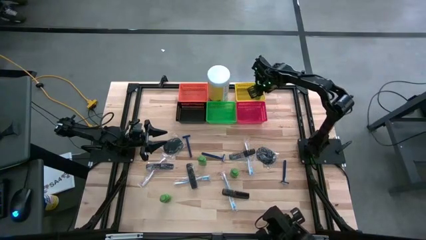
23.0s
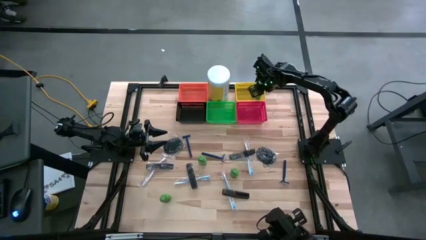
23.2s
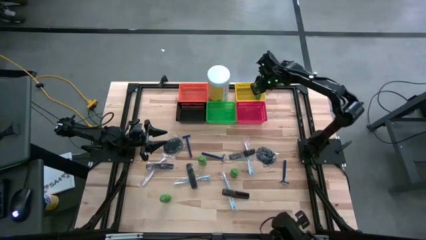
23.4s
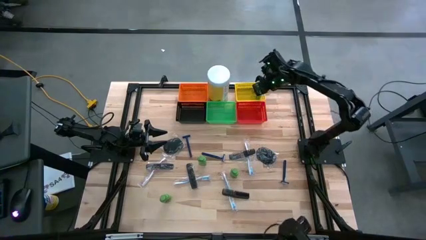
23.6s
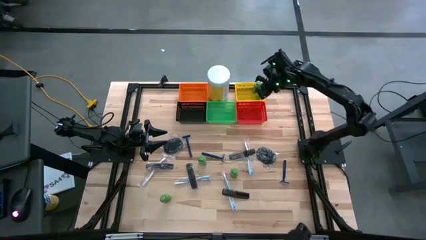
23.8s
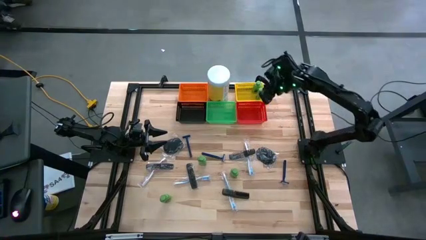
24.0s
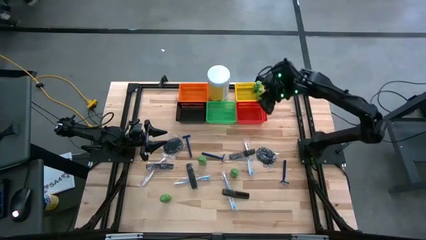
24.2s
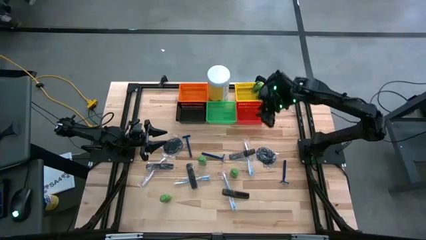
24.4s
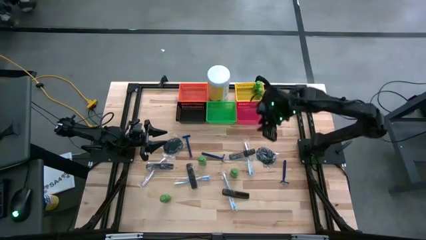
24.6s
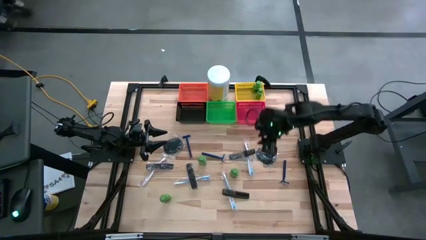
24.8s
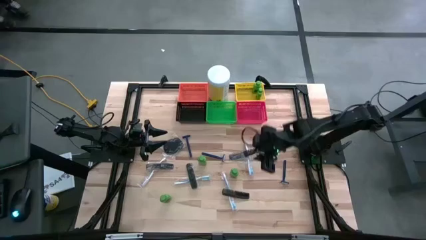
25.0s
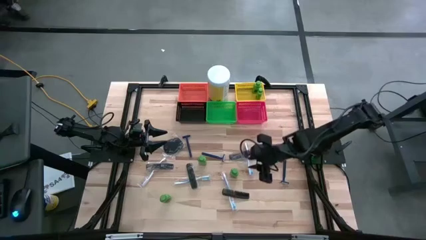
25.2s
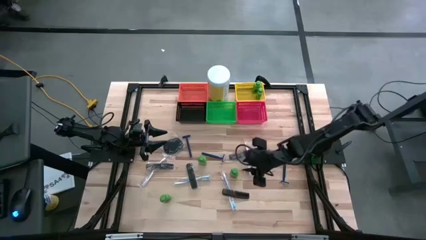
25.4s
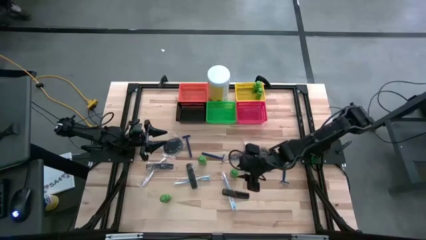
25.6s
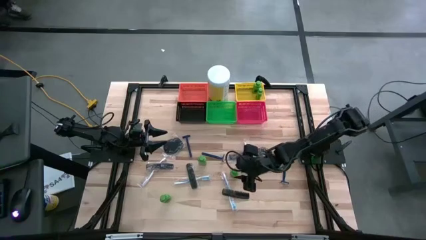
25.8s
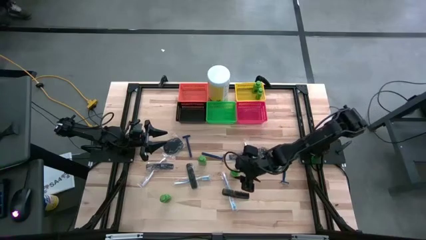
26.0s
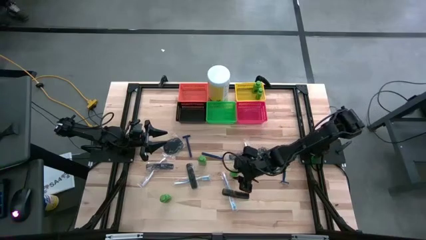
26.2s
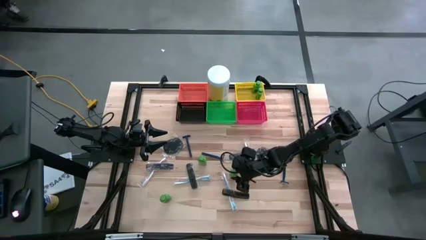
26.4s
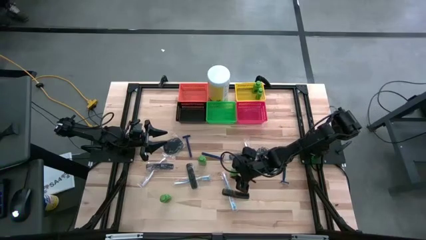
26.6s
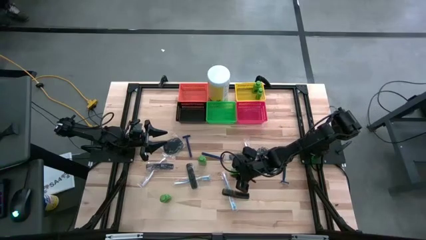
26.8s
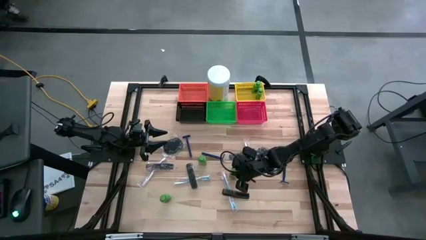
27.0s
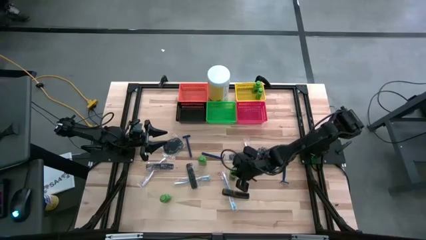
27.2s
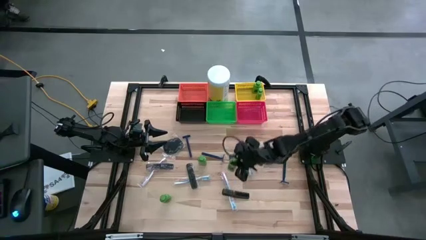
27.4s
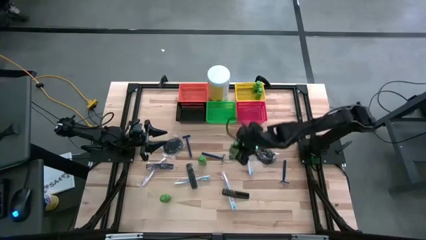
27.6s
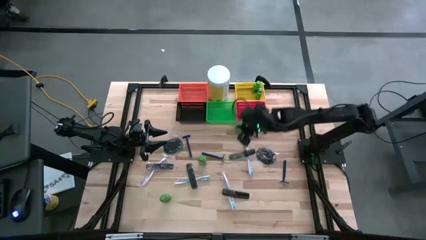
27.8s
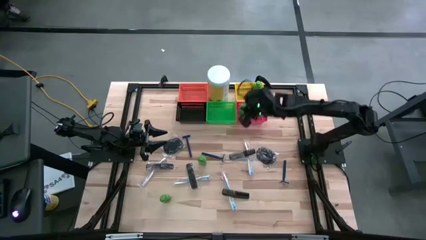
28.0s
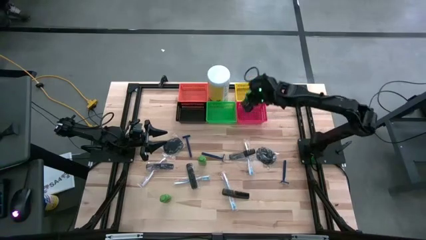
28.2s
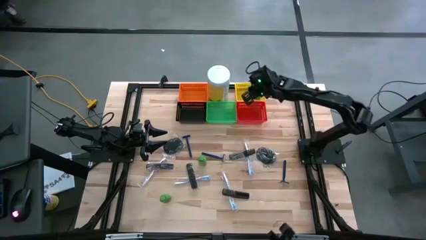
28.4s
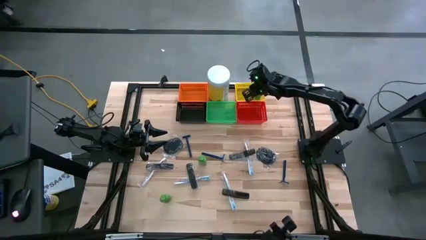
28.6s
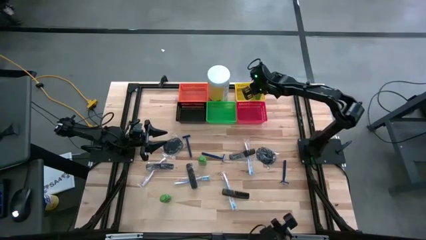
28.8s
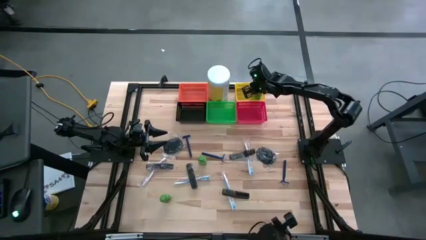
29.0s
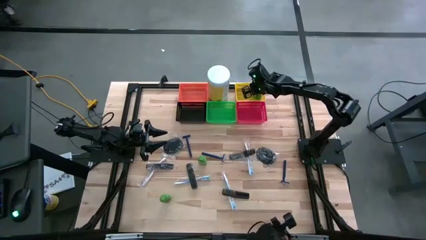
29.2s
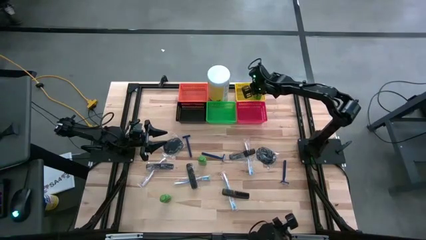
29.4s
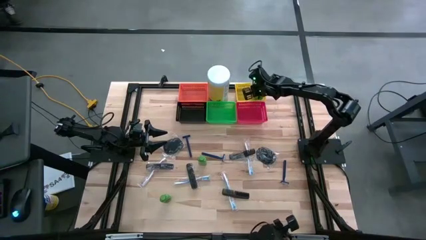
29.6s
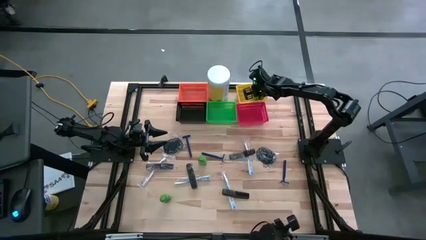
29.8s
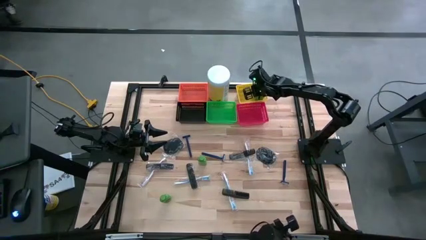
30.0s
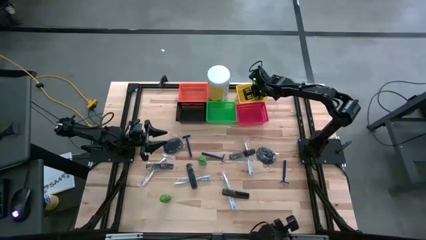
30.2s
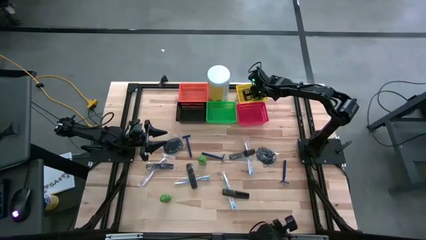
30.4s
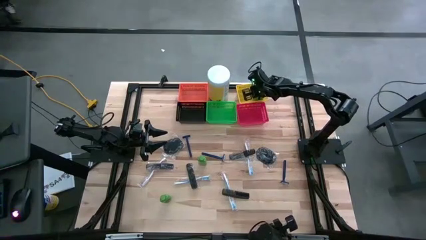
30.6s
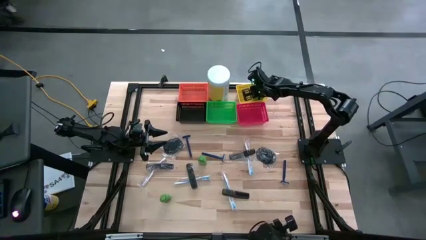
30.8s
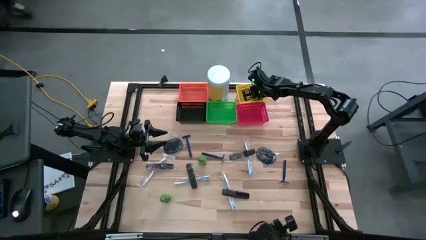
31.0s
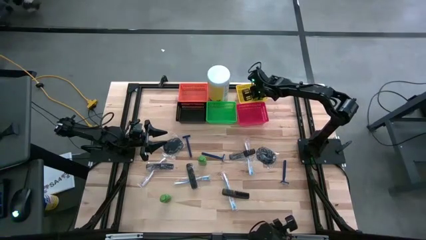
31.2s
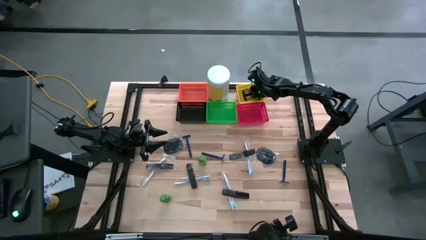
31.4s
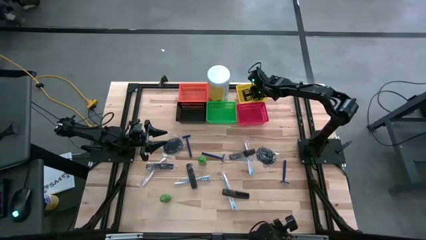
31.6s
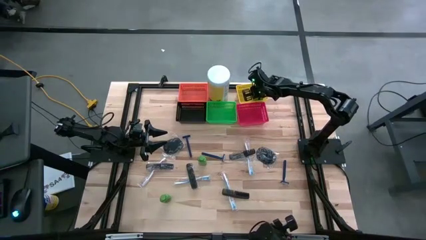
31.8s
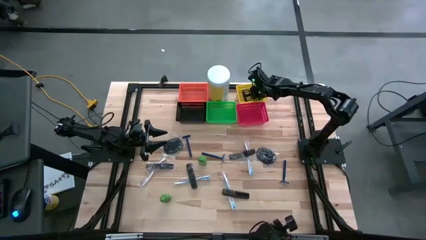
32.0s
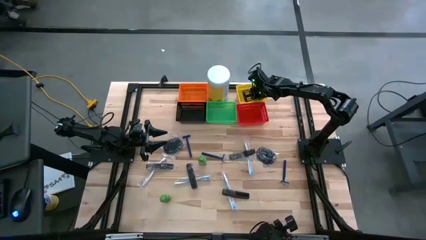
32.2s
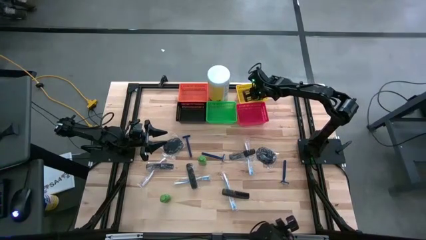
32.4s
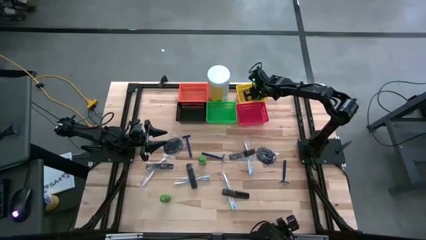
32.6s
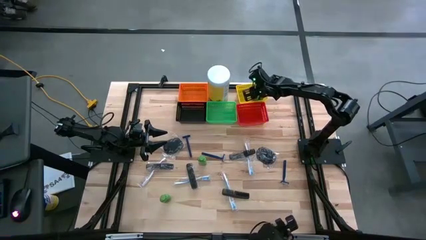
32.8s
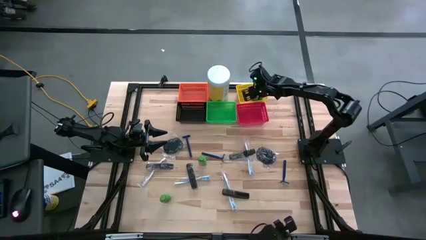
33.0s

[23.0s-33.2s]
Task: Pick & Place Travel size toiletries
Put the green shampoo into the yellow bin
